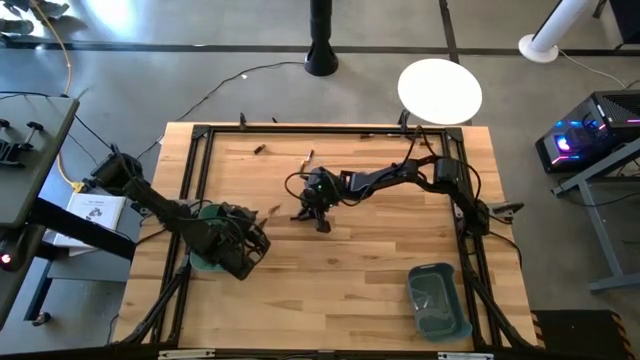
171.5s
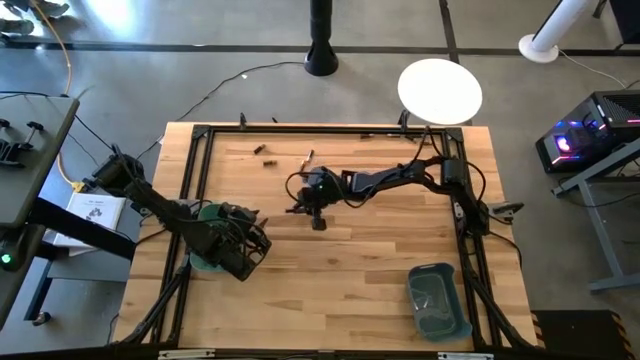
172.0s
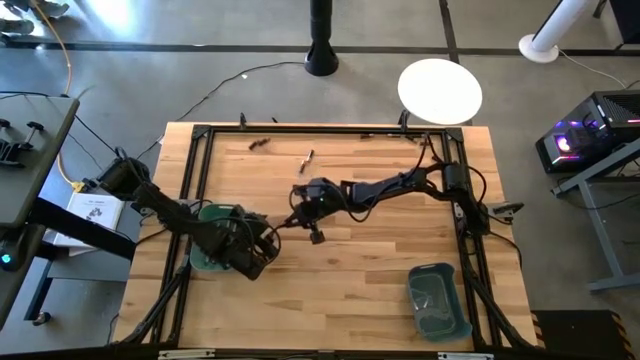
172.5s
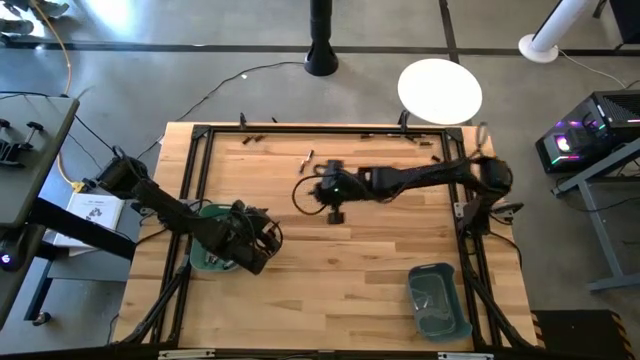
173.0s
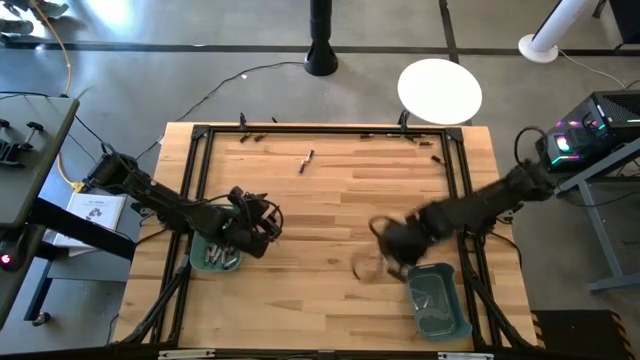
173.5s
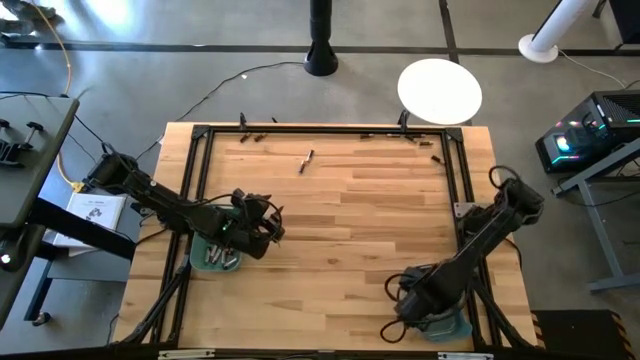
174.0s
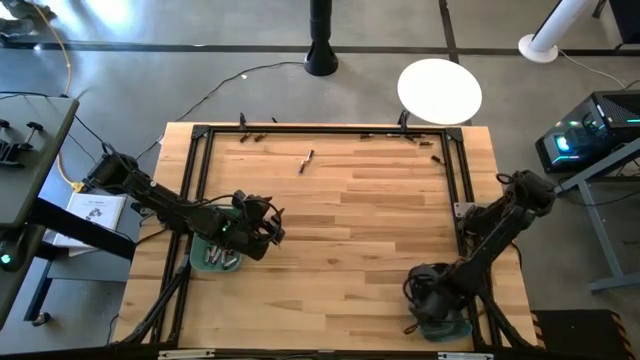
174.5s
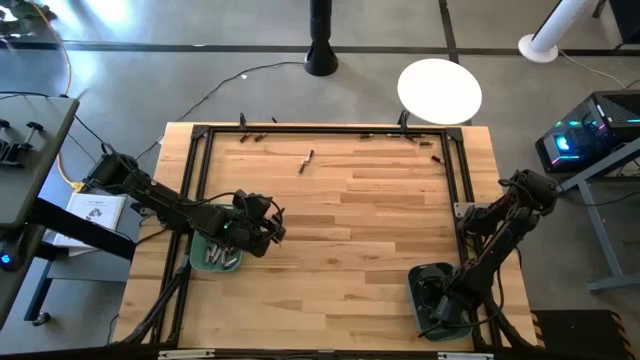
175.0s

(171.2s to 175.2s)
Task: Sort batteries
Put the black battery into the blue bin

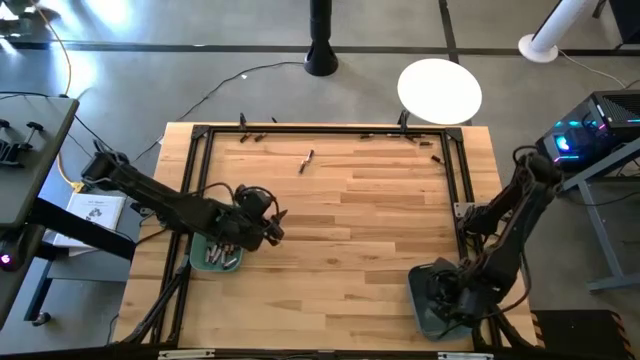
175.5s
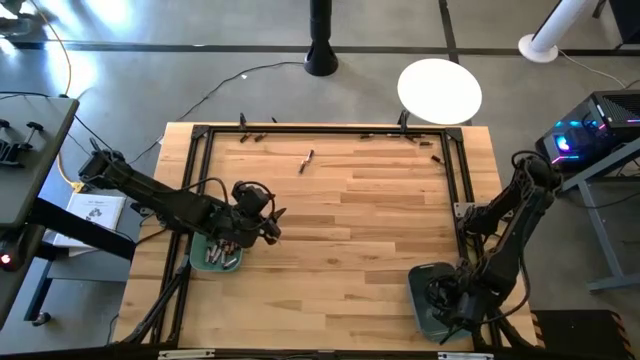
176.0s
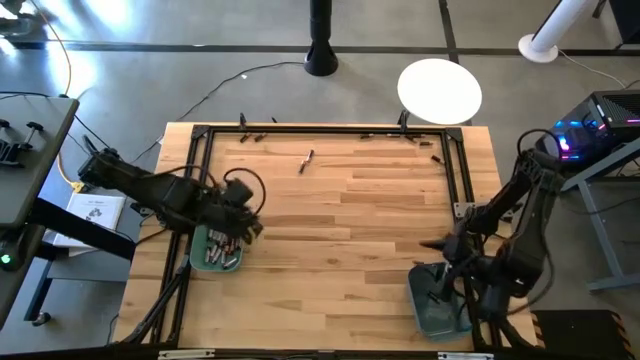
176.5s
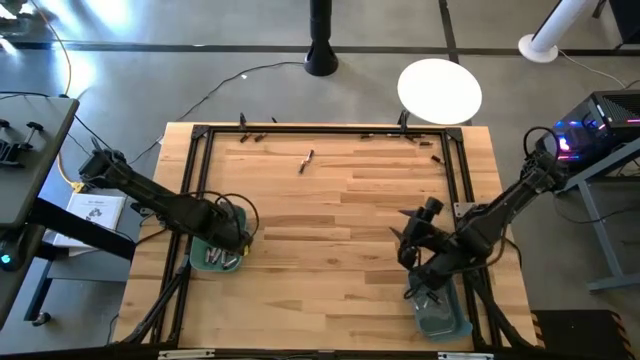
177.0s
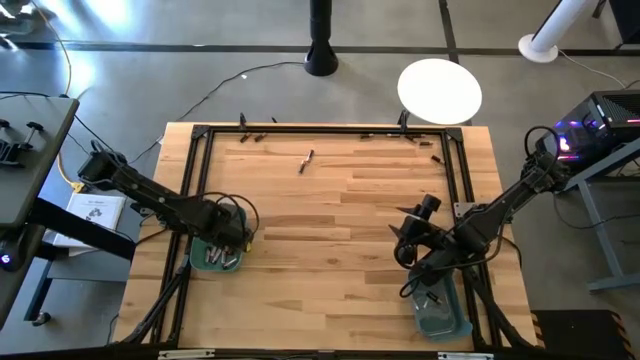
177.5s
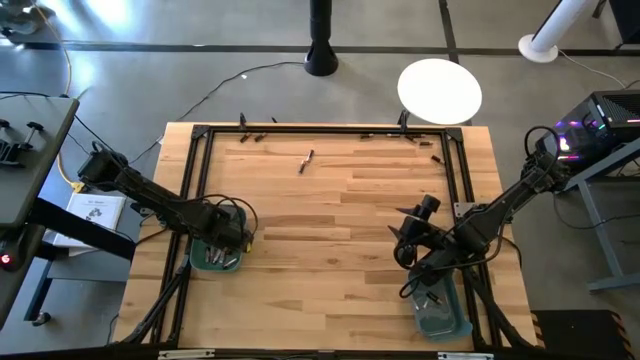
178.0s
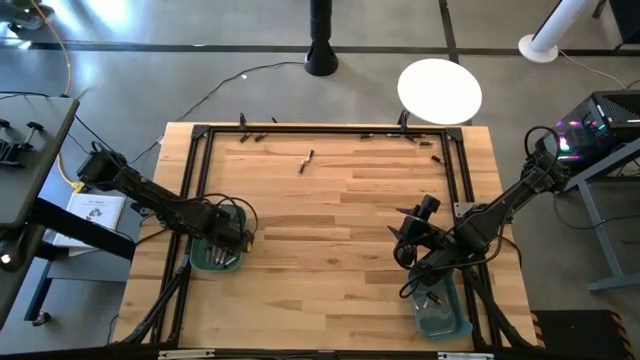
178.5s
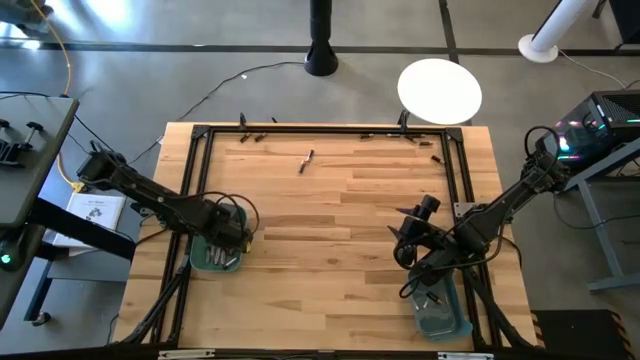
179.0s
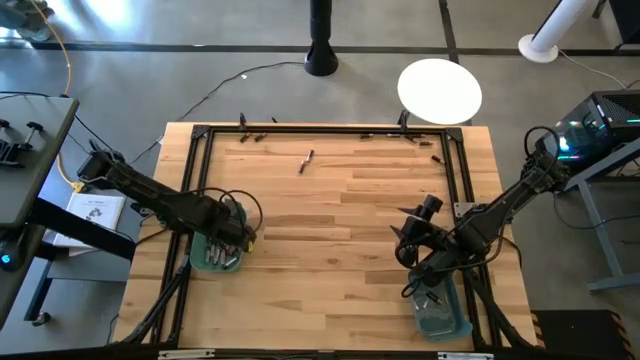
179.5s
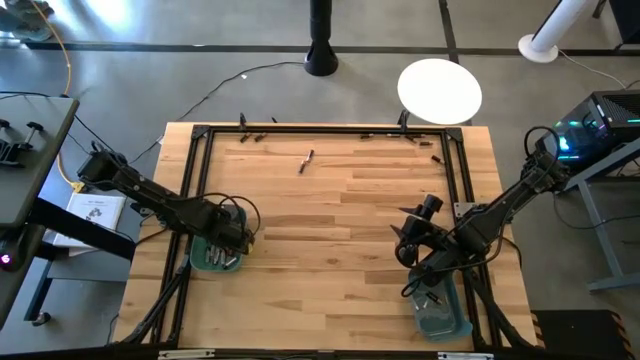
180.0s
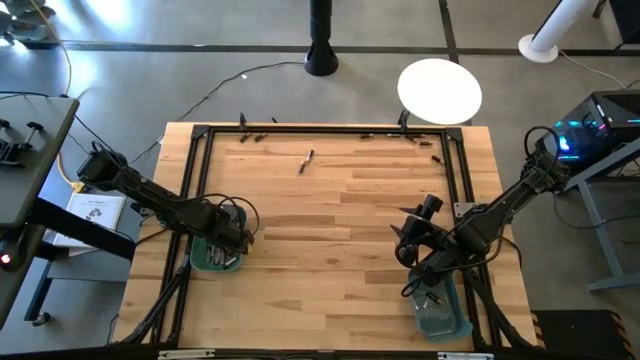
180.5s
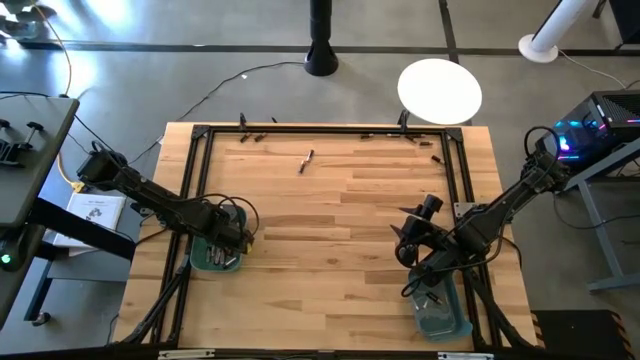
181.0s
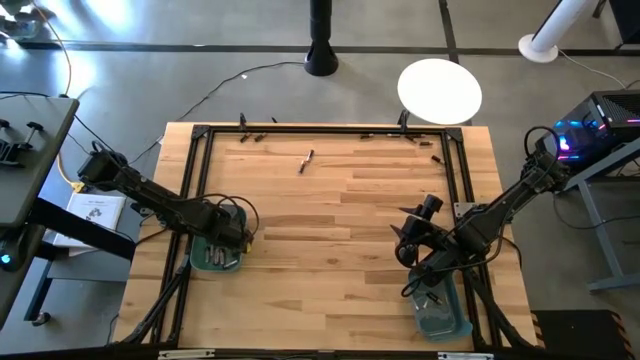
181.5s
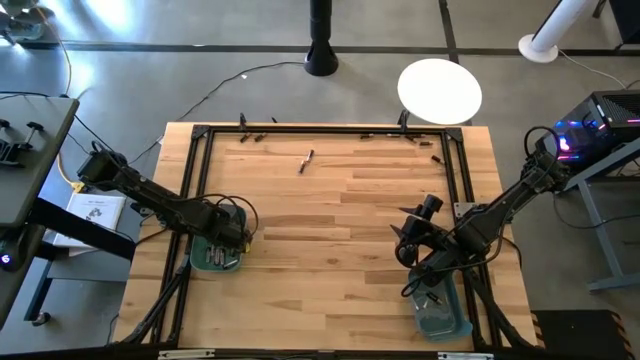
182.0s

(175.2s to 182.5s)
Put the black battery into the blue bin

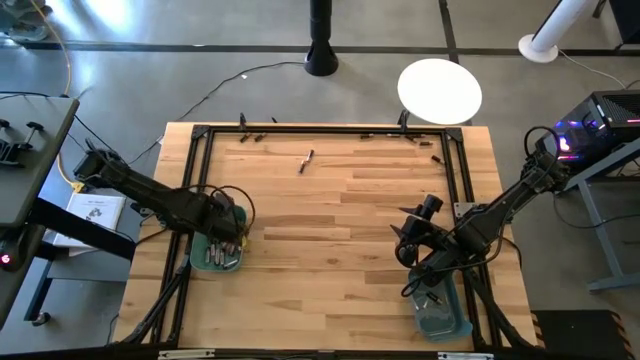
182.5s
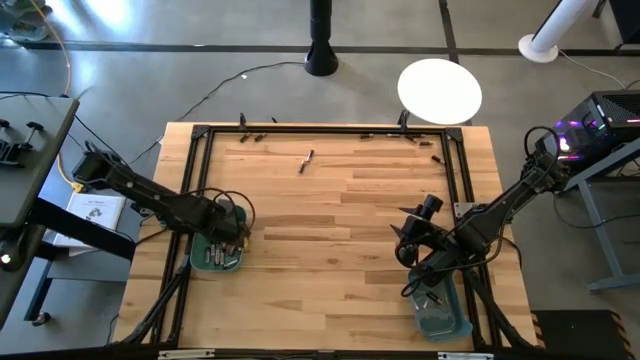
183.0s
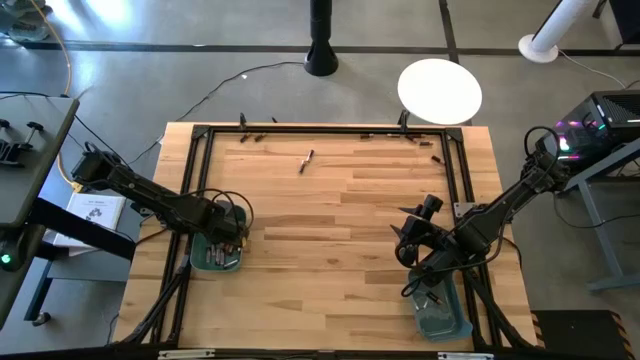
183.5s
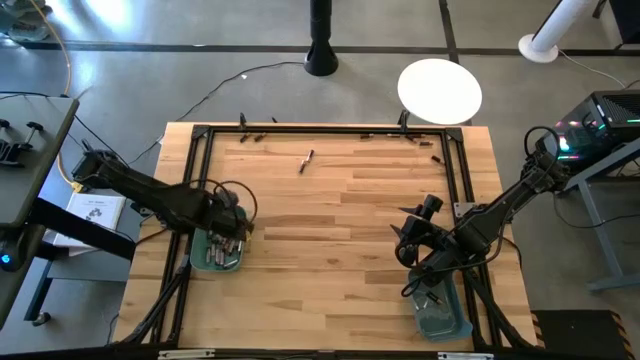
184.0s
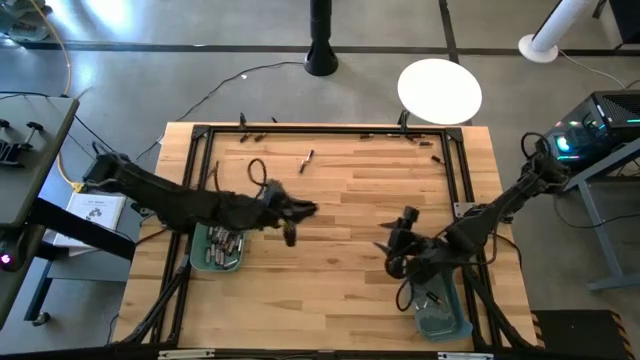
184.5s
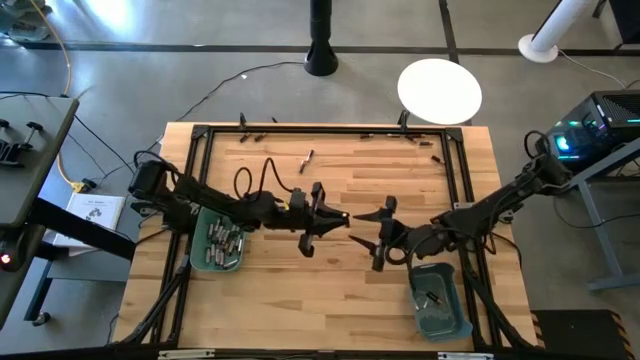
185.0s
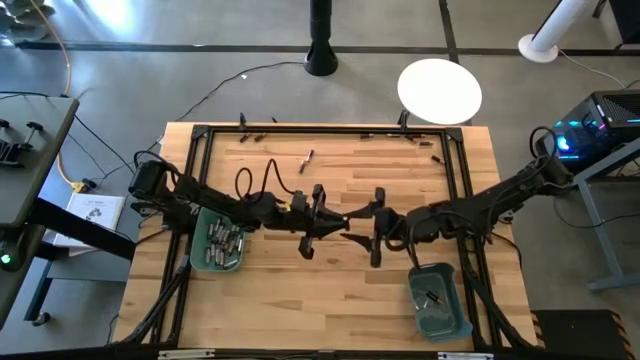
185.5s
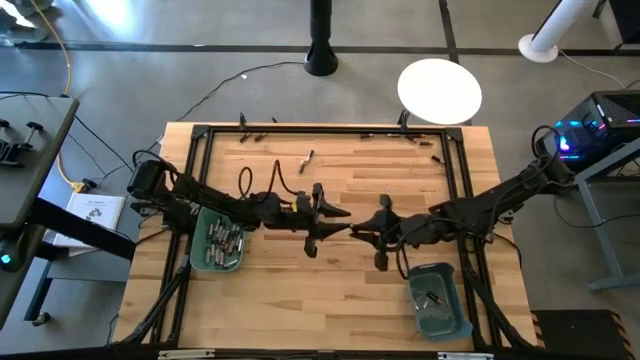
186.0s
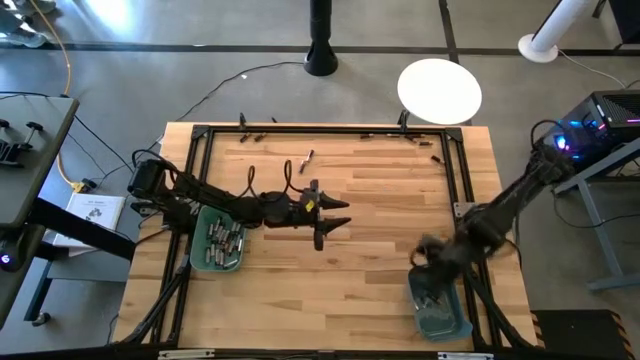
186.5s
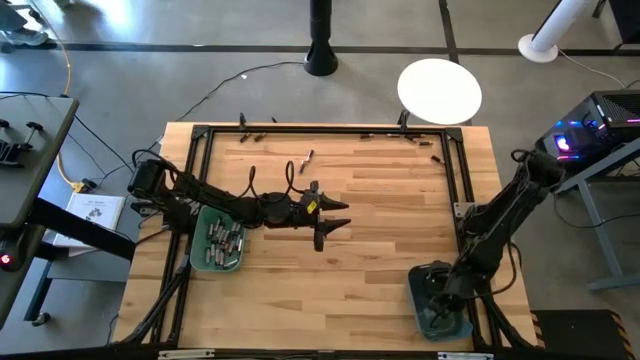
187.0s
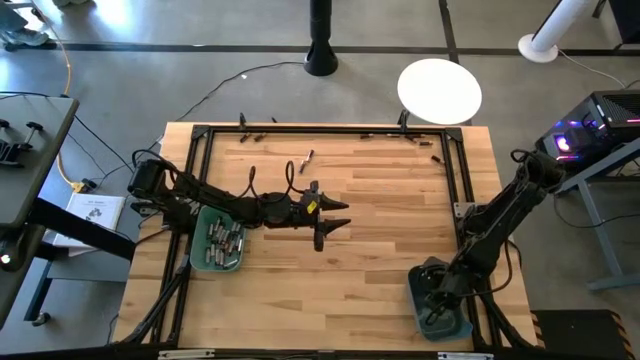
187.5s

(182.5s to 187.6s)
Put the black battery into the blue bin
